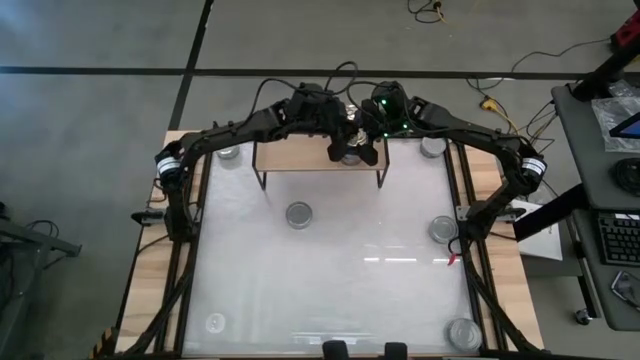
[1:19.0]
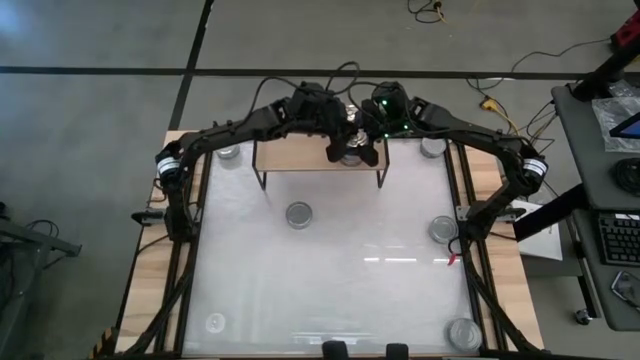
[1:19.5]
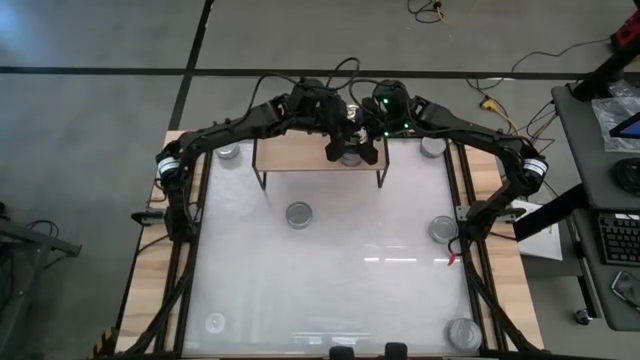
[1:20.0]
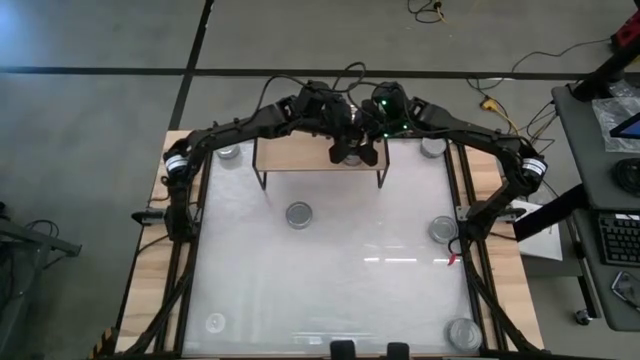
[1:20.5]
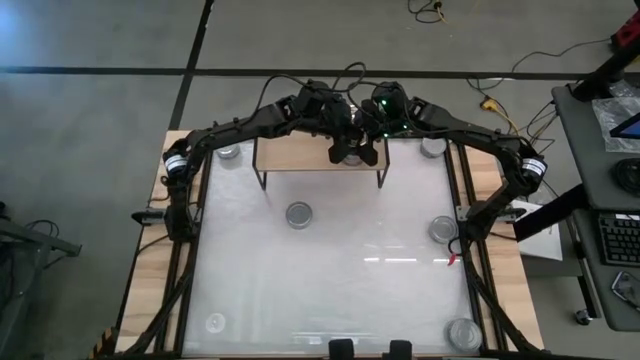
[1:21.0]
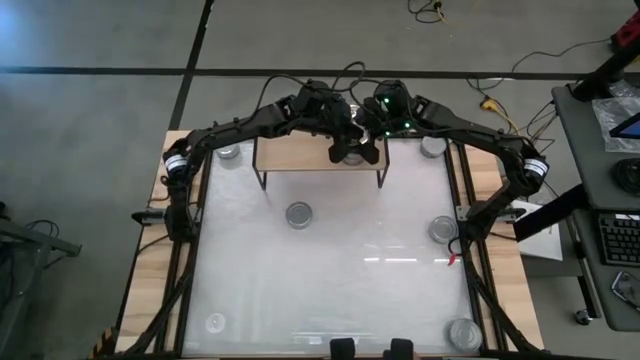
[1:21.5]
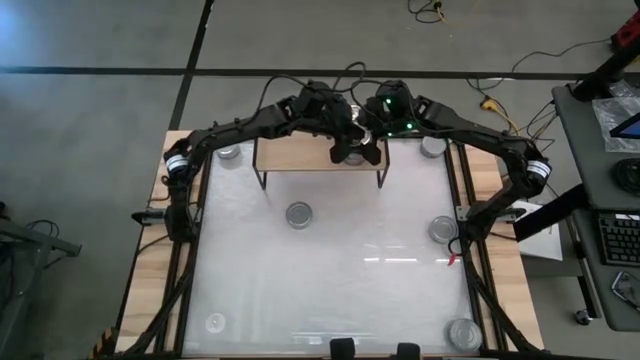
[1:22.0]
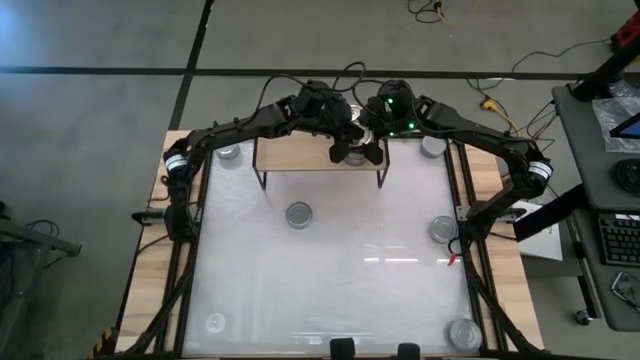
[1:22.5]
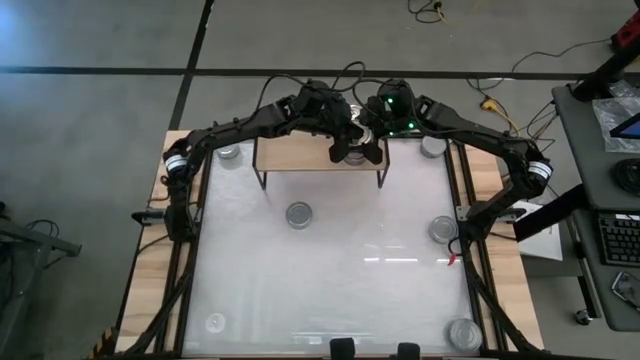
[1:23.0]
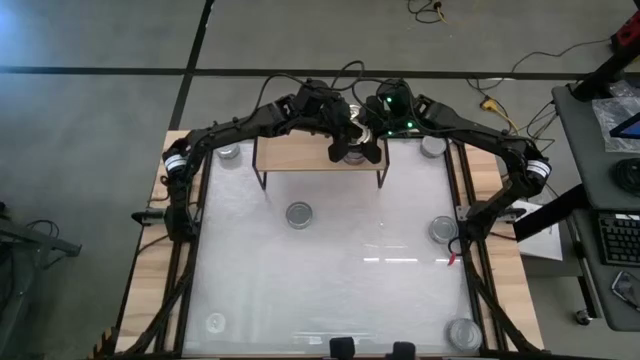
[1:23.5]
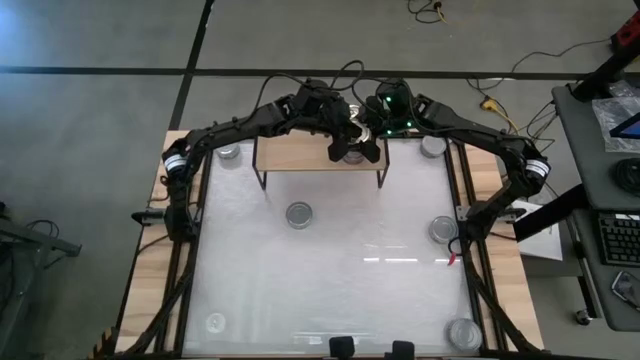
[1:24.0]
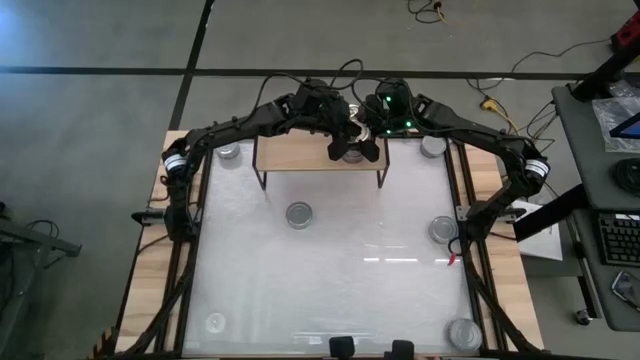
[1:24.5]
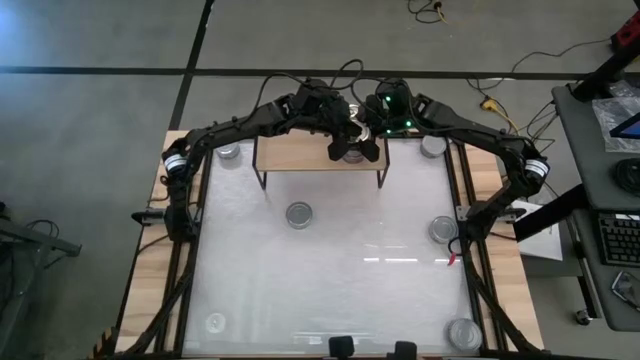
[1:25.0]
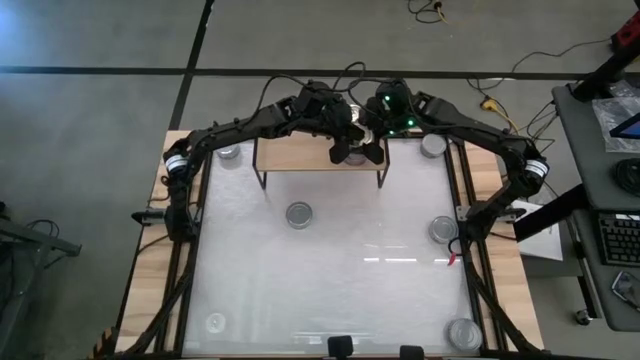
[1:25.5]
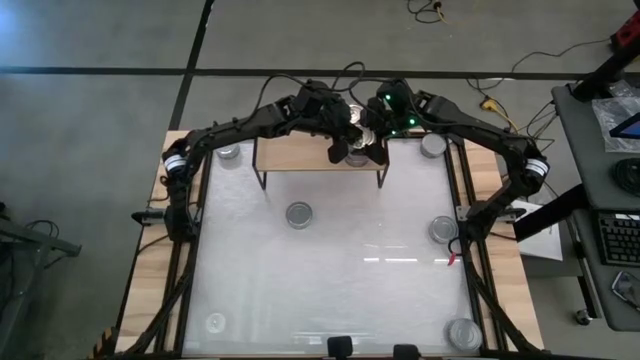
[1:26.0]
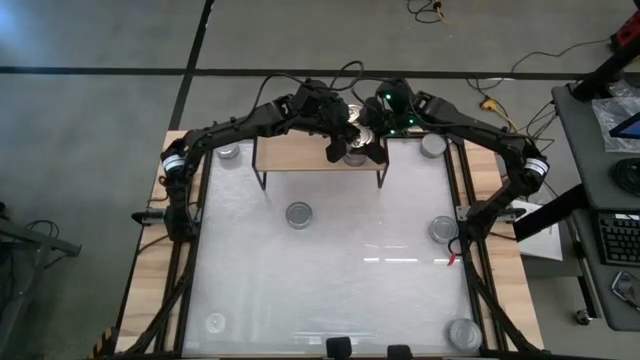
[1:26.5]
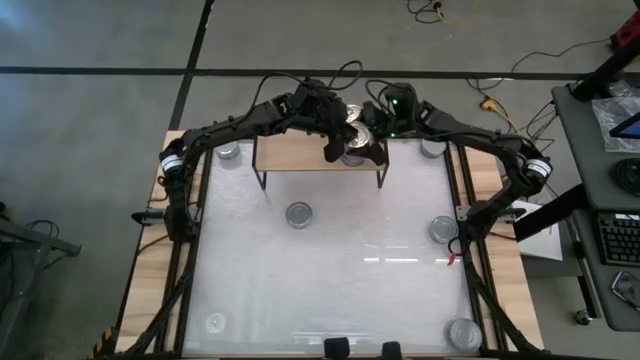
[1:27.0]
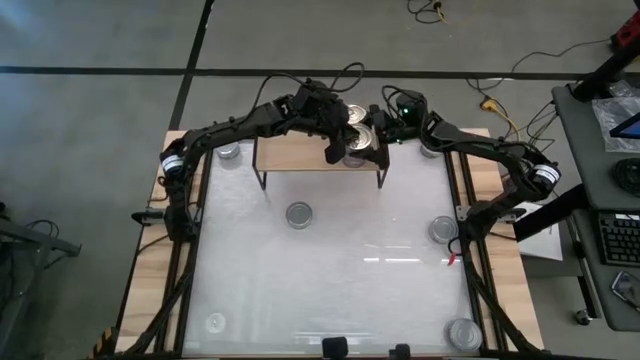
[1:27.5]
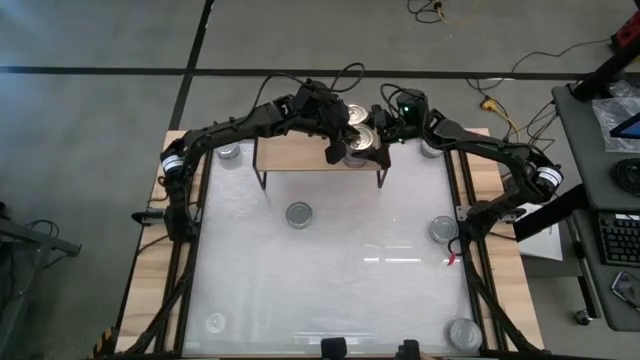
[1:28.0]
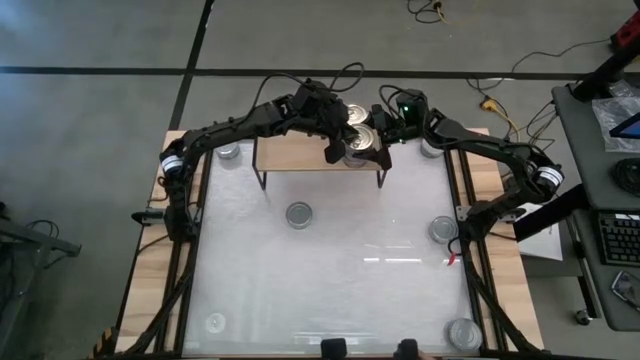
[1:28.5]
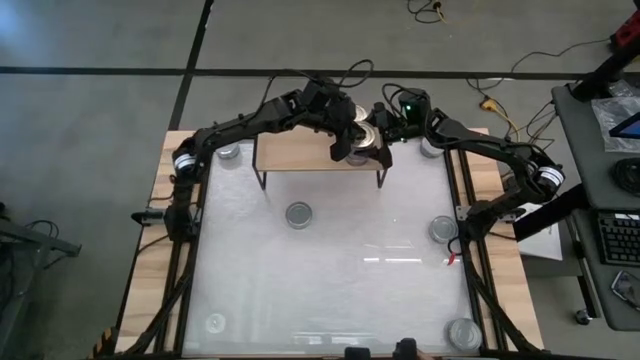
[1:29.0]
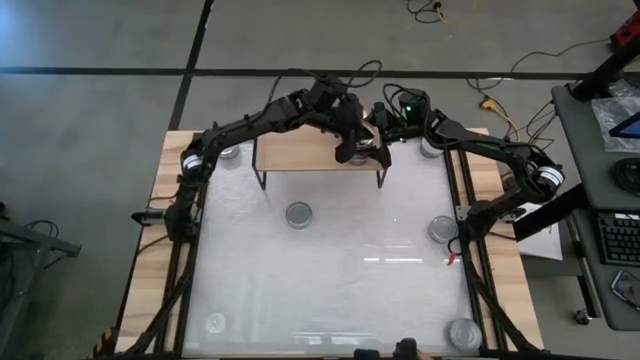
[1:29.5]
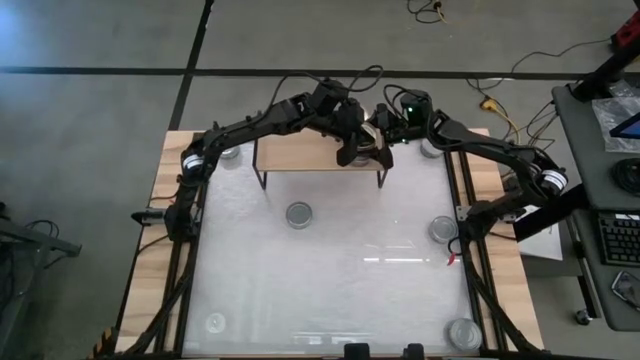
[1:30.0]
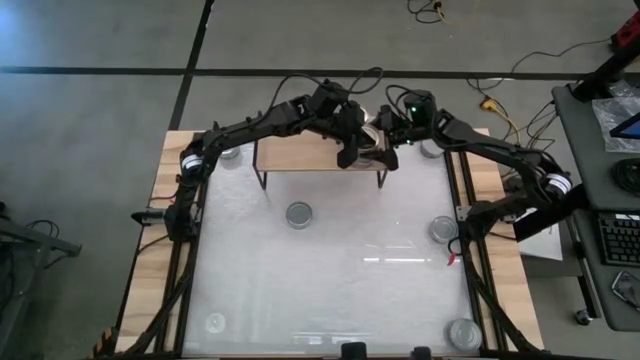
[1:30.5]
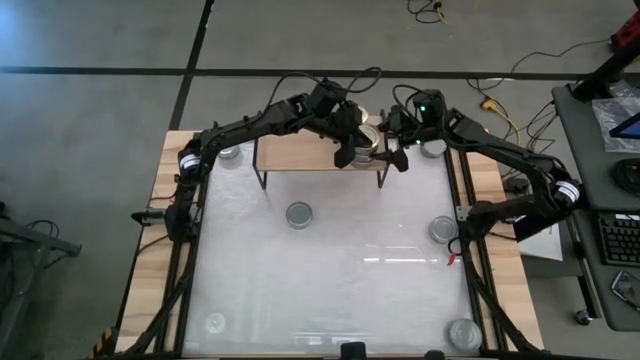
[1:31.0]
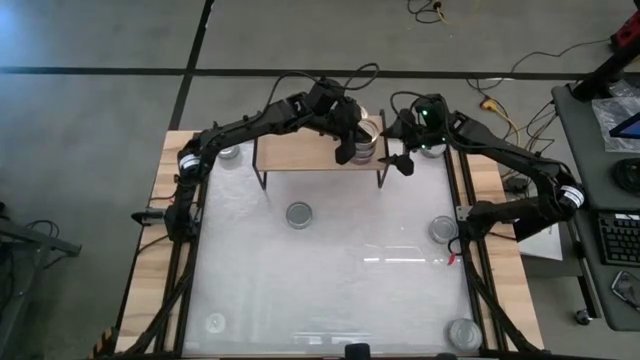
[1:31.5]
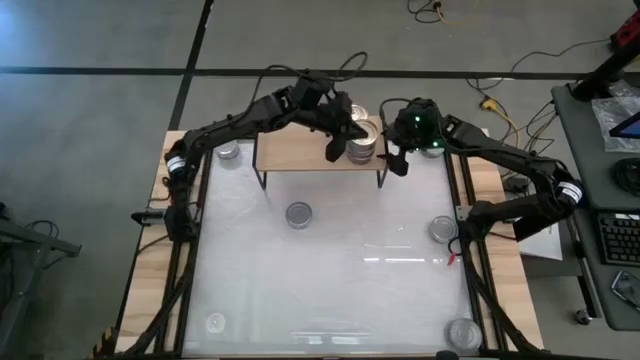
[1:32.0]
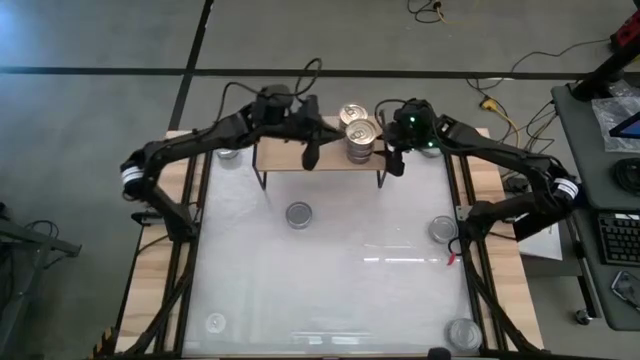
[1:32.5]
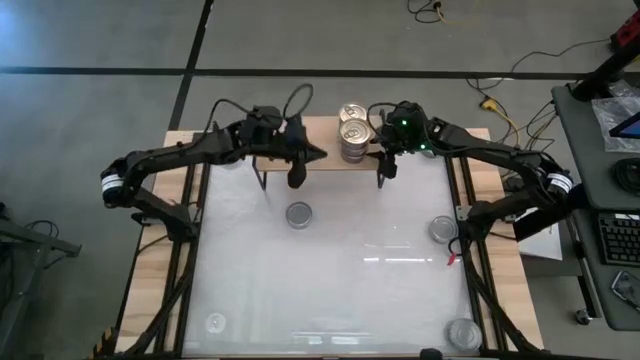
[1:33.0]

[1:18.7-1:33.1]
Task: Stack canned seafood by type on shelf
Stack the blue-pink tuna can on top of the other blue-pink tuna can on the shelf

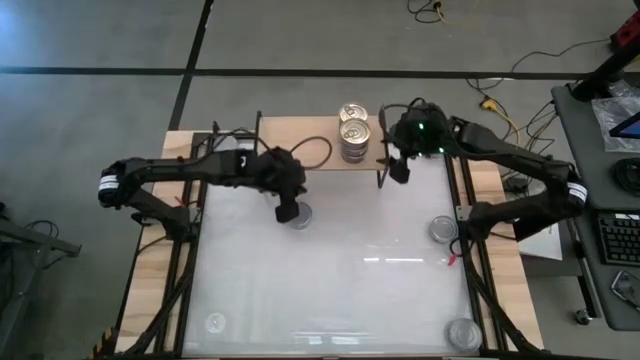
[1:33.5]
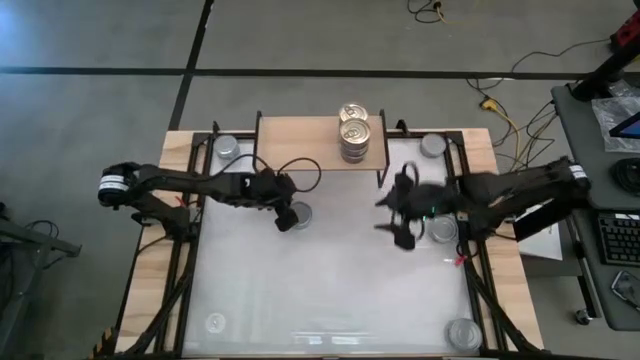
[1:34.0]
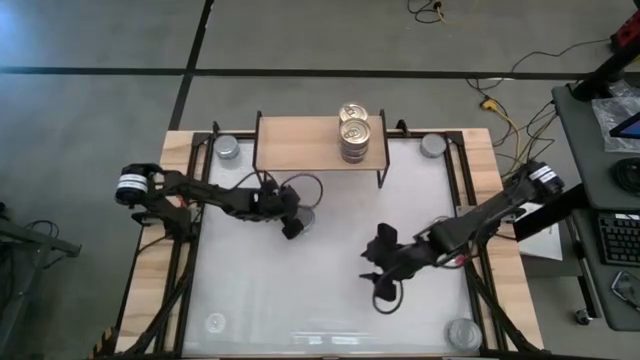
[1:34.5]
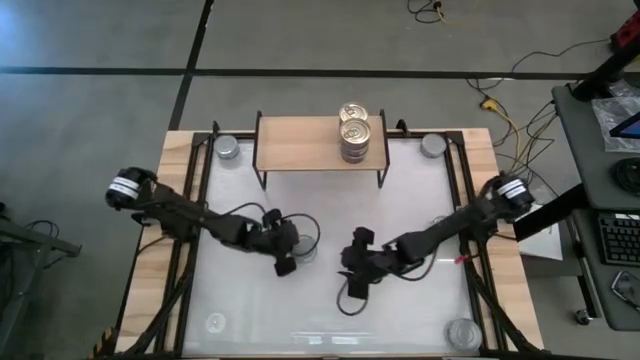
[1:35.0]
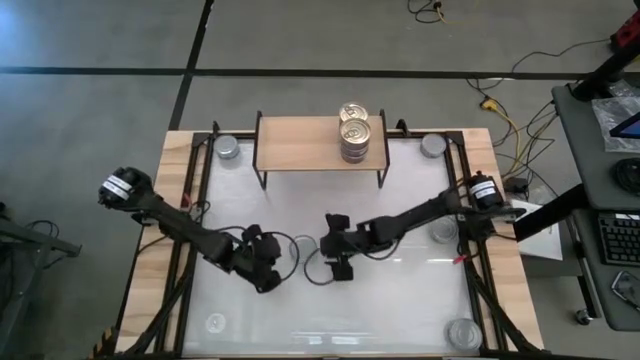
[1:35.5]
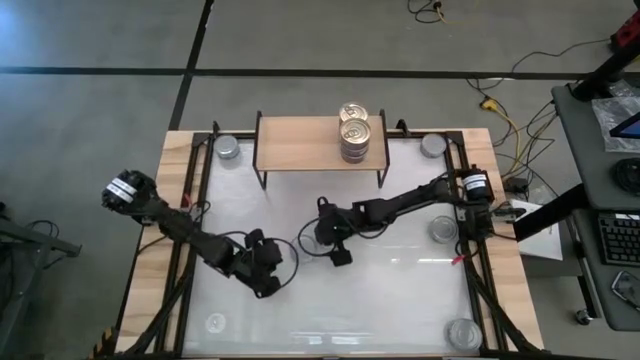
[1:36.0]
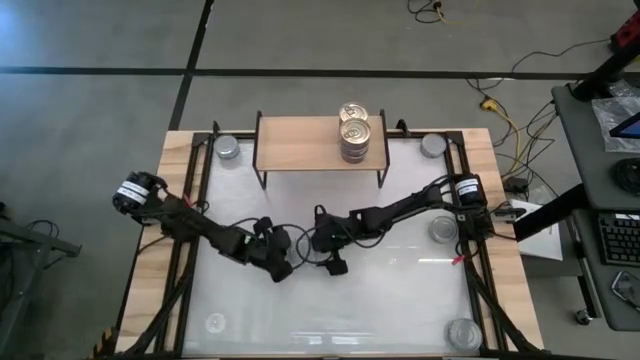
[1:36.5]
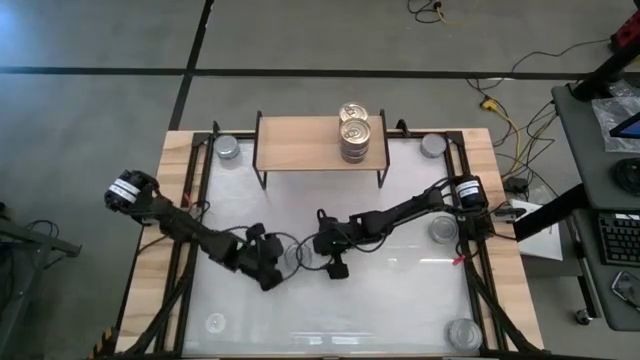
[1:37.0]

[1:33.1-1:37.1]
Put the green tuna can on the shelf

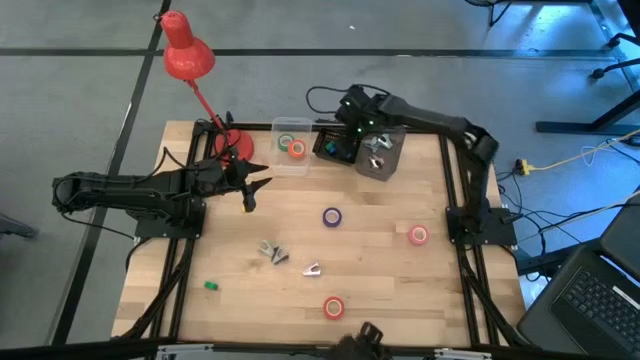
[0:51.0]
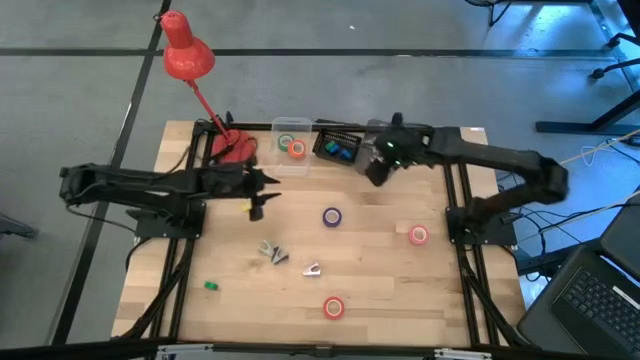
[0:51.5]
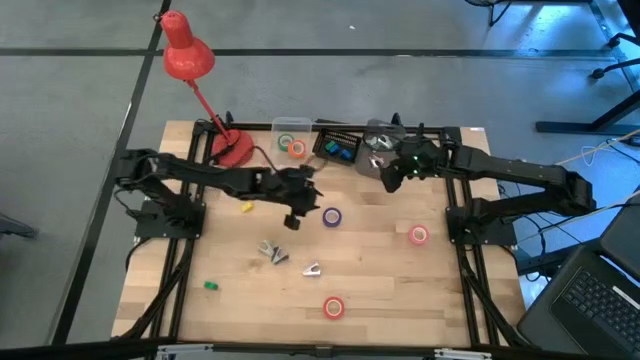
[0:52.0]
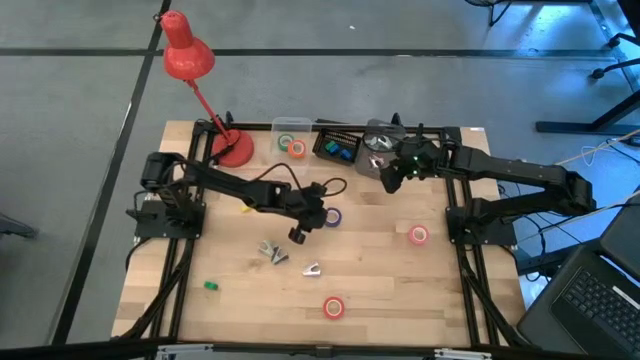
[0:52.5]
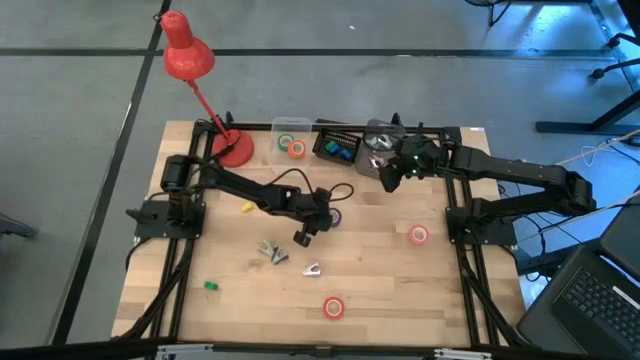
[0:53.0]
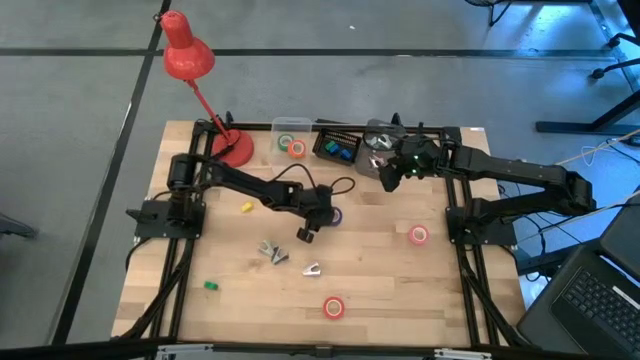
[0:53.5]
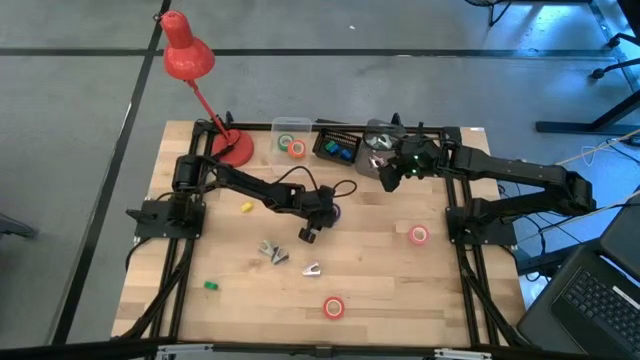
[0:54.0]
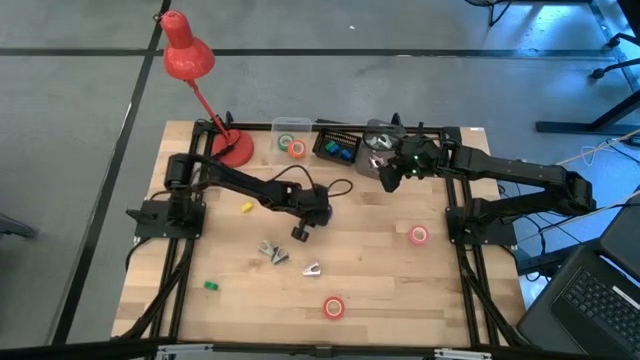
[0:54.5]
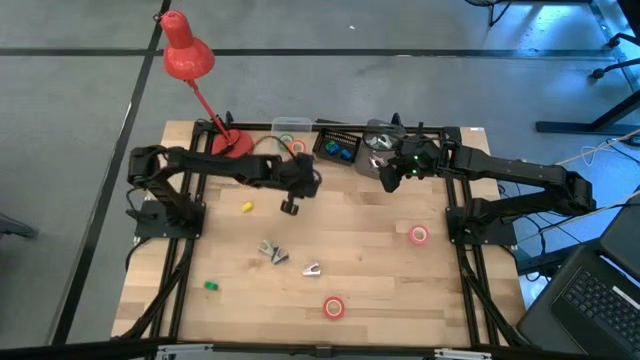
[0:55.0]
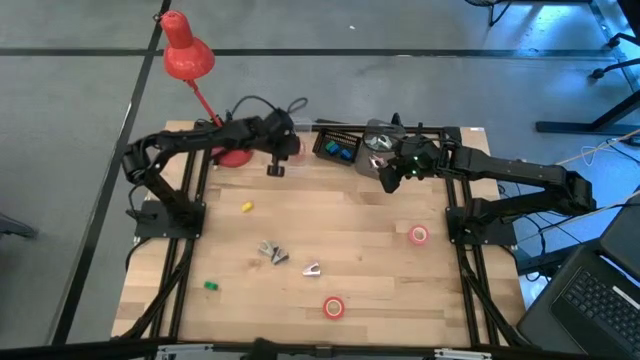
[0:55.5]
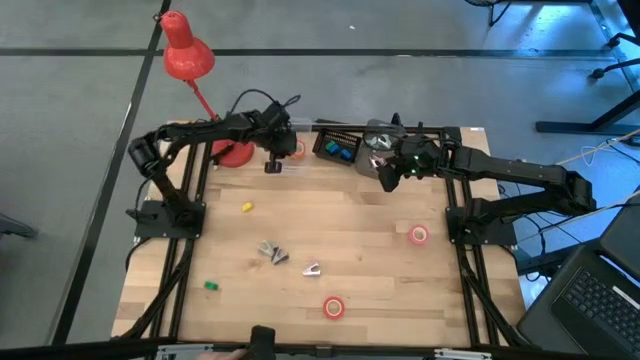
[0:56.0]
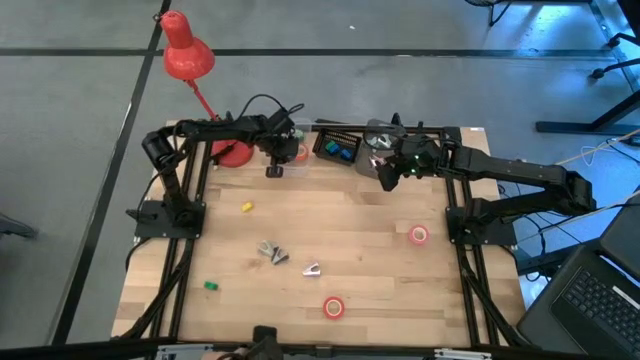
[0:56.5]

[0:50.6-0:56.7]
Task: Pick and place Stapler, Stapler remover, tape
Put the blue tape into the transparent bin
